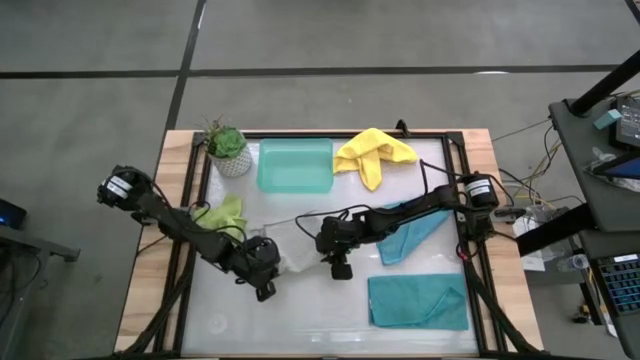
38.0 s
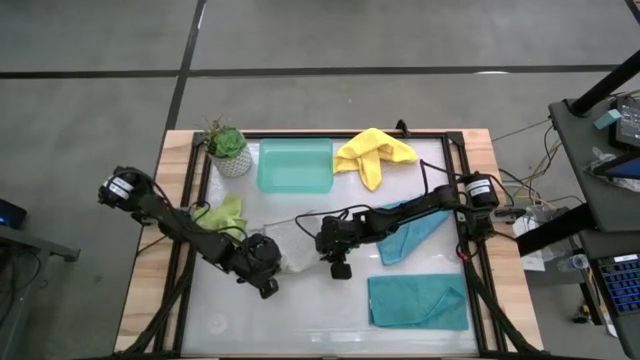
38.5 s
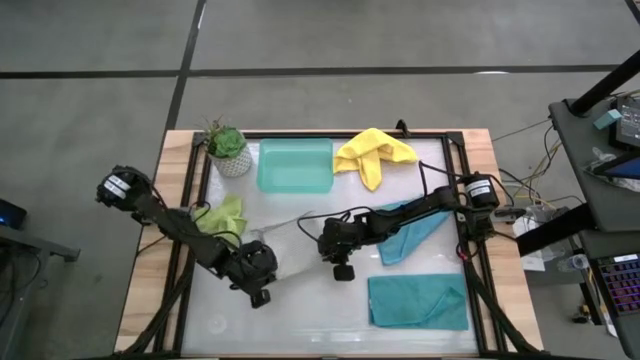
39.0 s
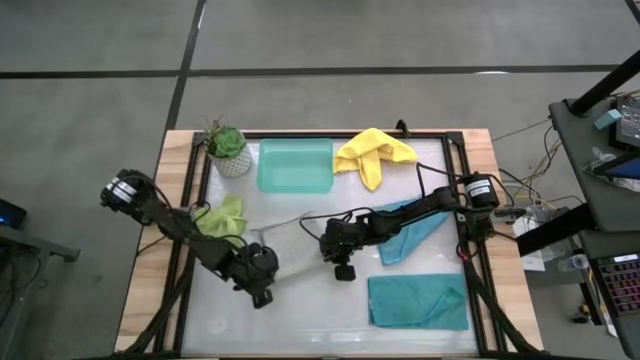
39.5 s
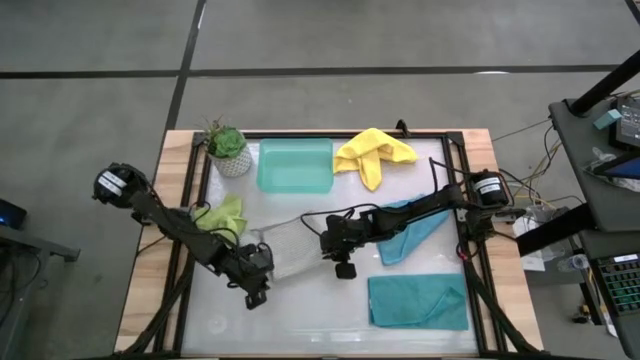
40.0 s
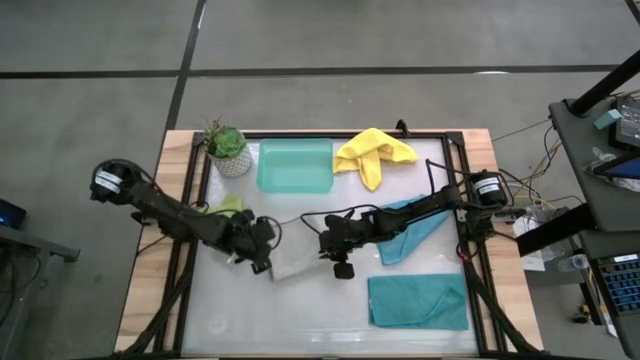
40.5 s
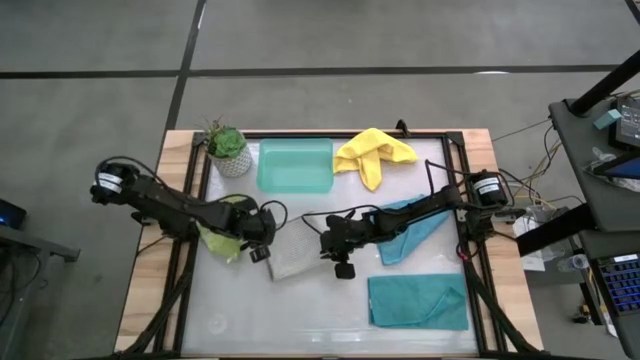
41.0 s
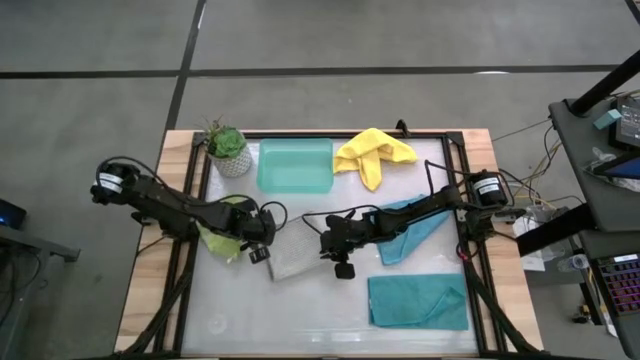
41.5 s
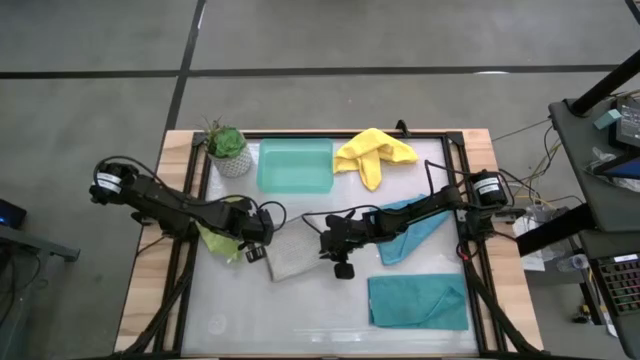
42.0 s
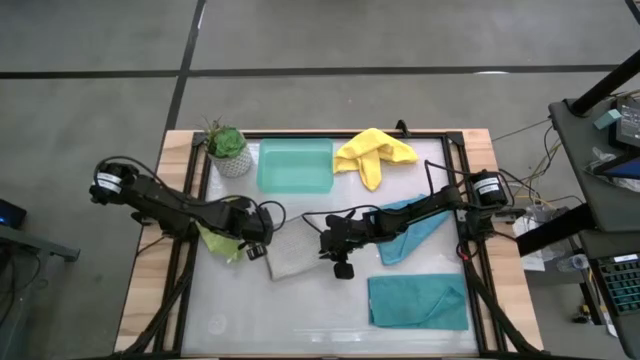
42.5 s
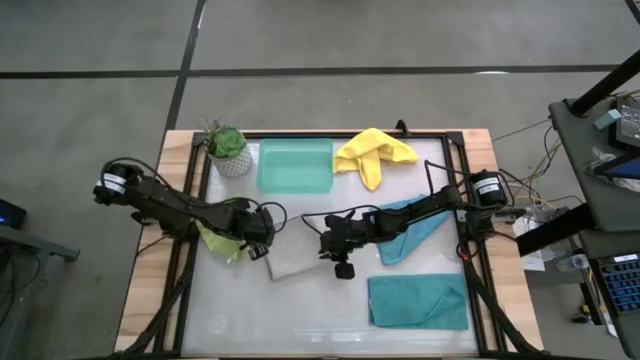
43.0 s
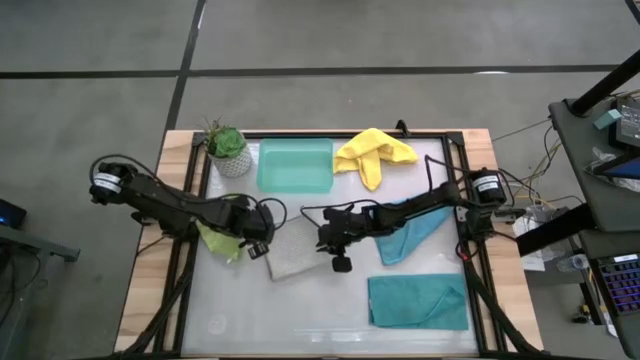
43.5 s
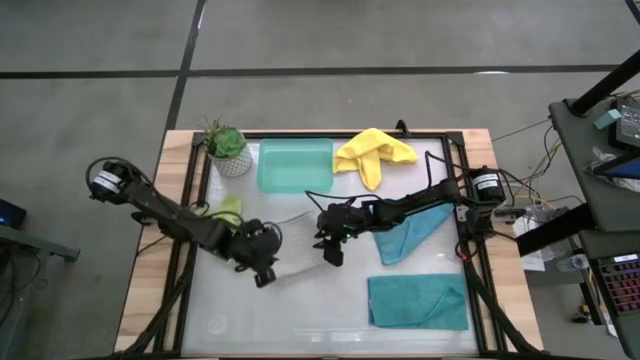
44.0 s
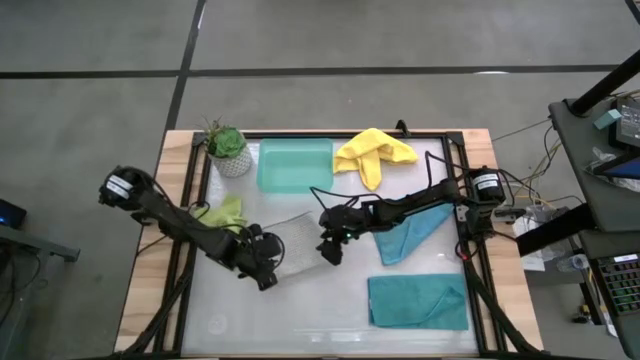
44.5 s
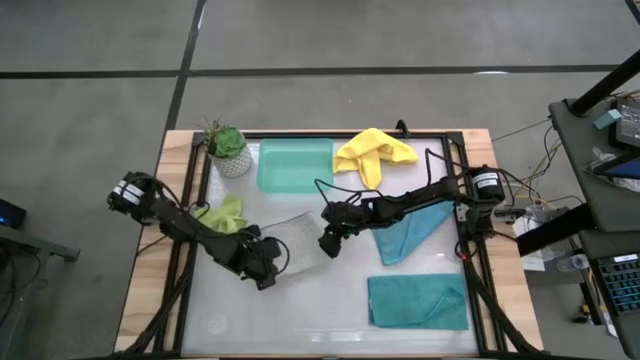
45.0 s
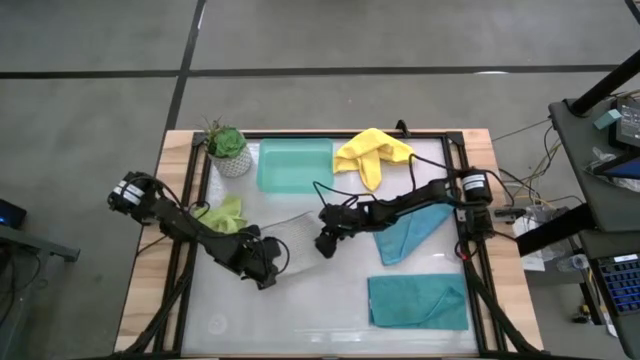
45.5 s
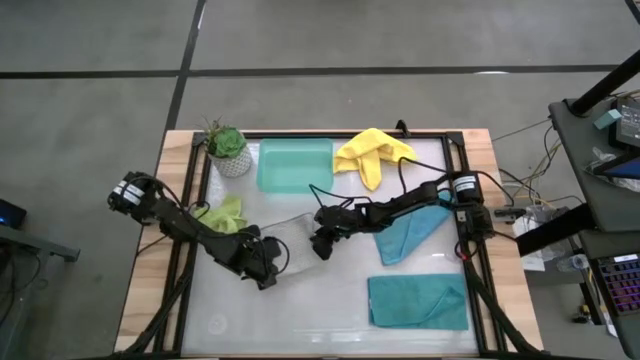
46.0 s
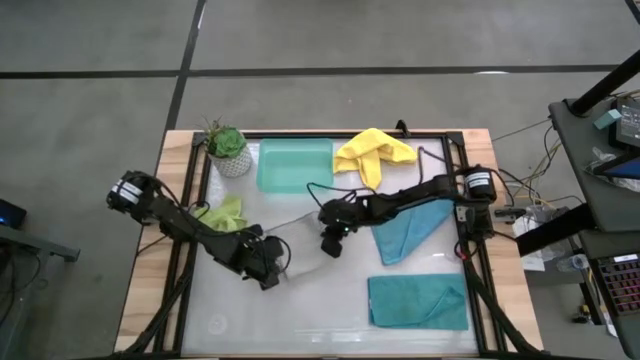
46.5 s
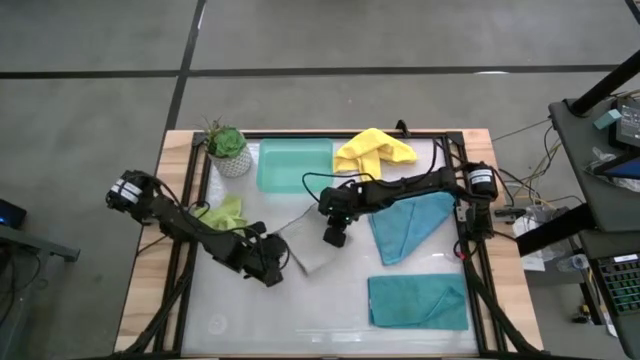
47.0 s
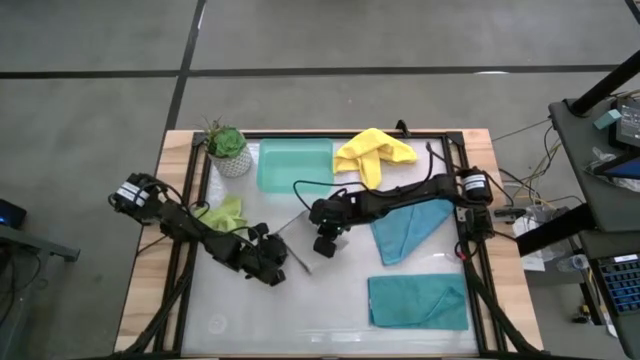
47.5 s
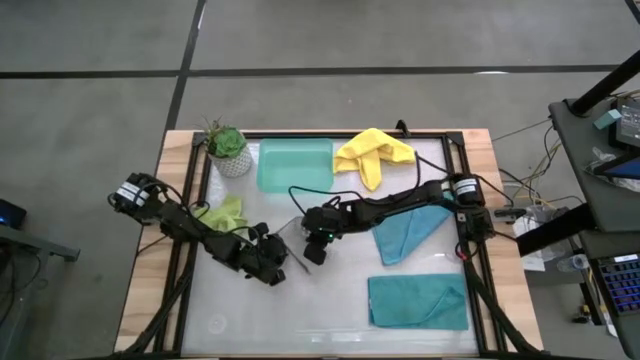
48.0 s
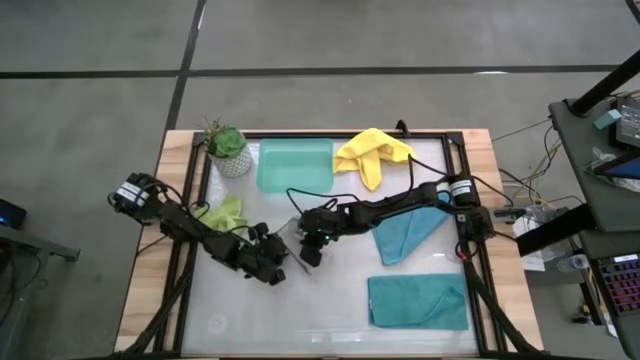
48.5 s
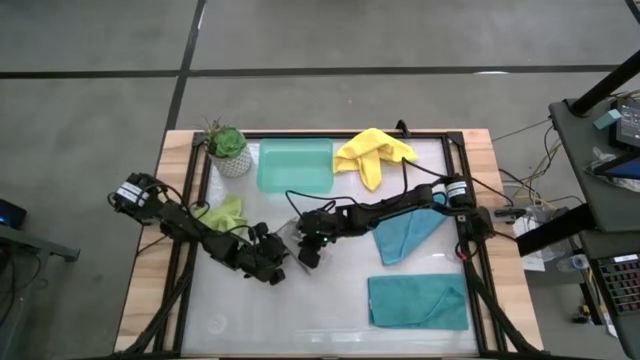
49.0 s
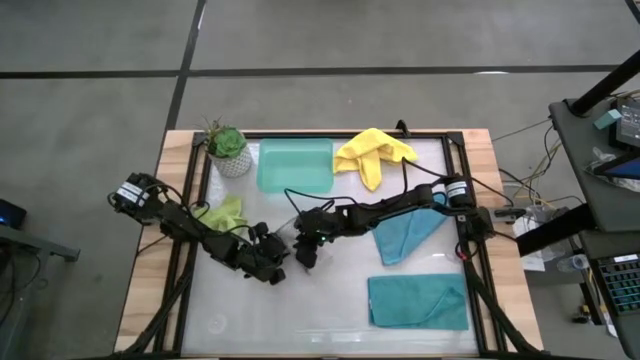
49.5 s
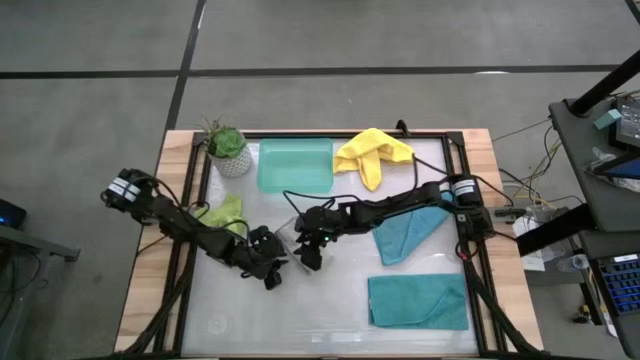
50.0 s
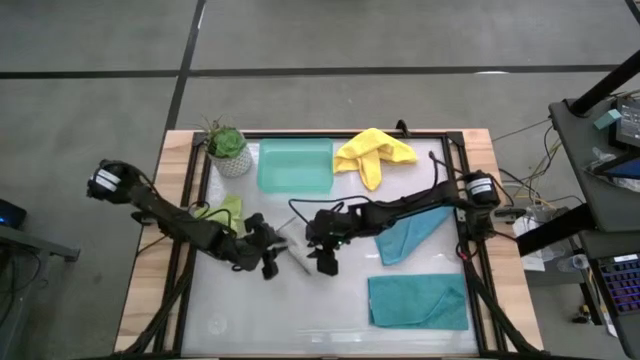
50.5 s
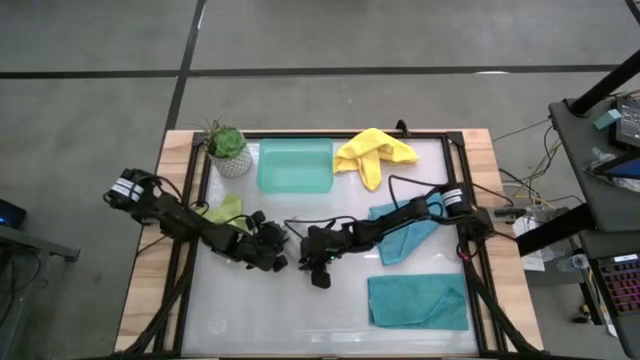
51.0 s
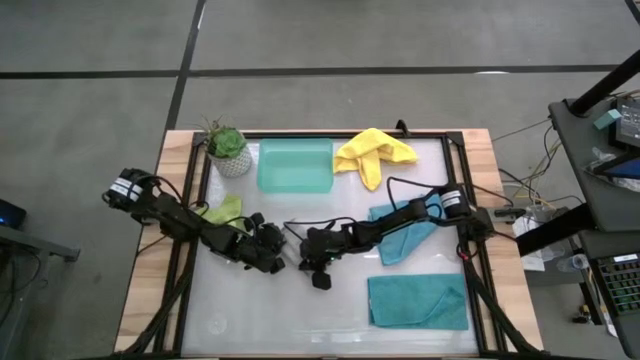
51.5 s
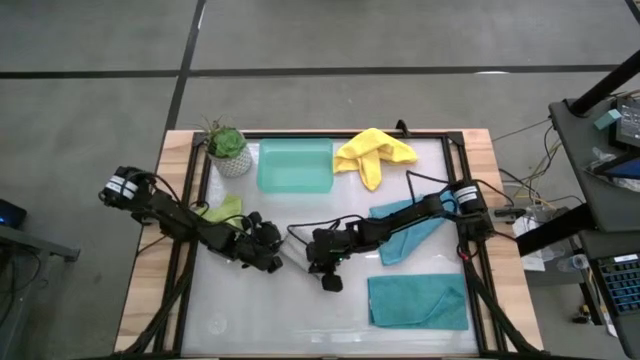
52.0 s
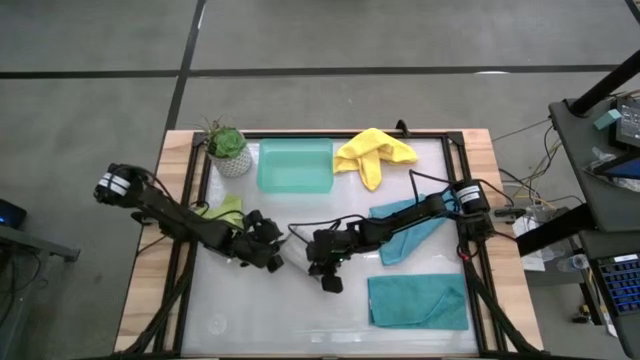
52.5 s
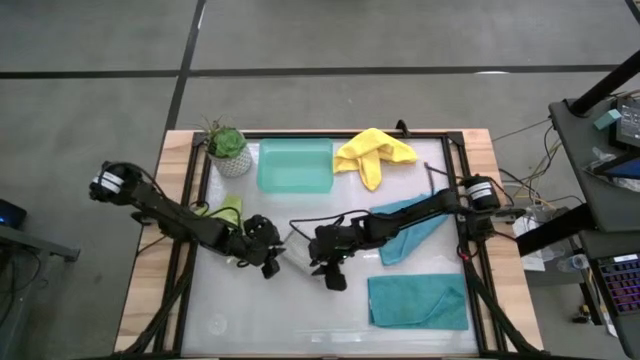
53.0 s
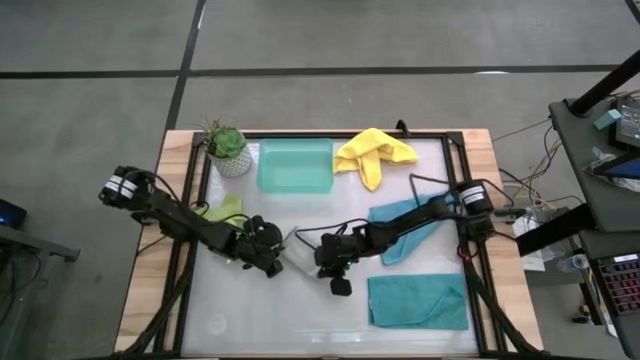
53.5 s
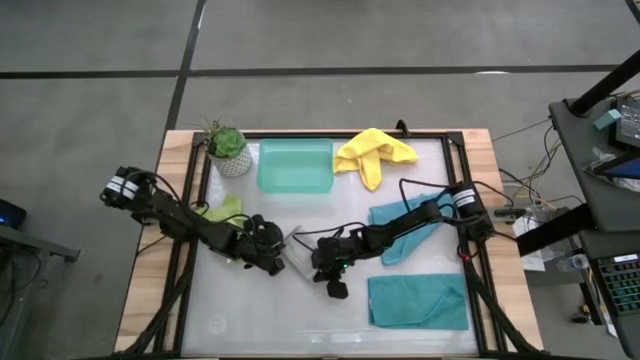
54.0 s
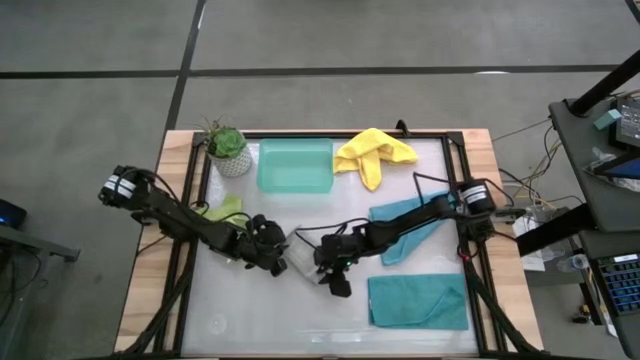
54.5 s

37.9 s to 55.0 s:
Task: Fold microfiber towels
Fold the gray microfiber towel

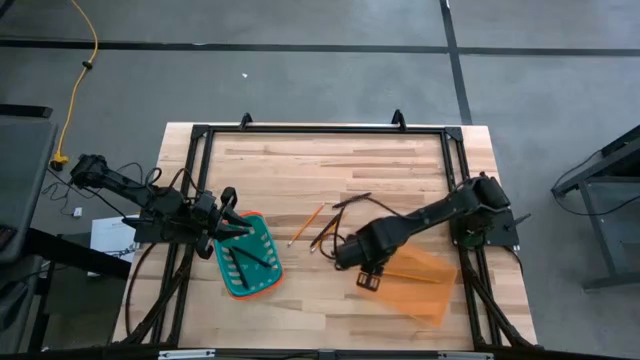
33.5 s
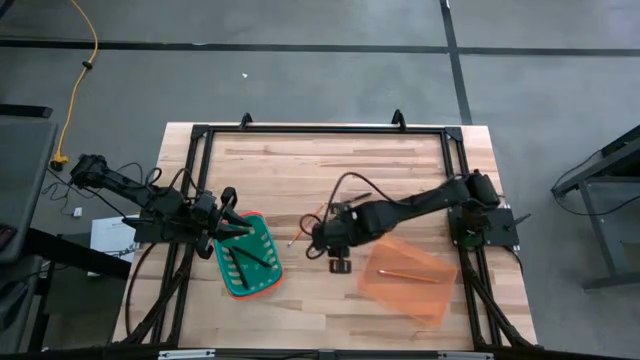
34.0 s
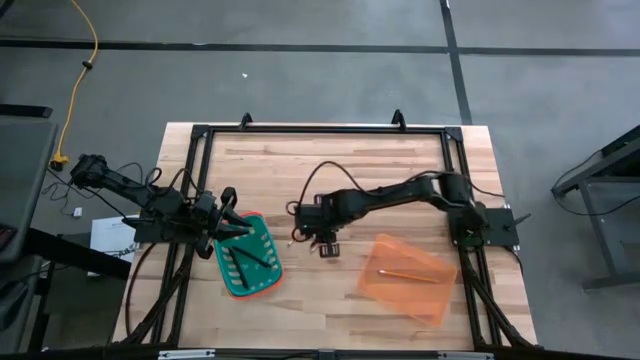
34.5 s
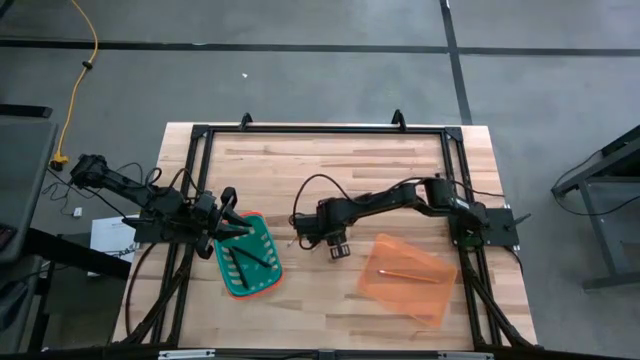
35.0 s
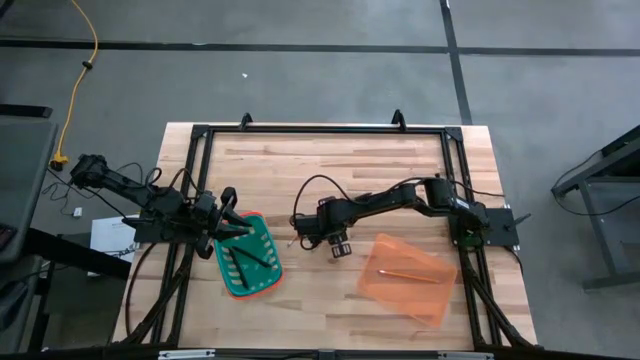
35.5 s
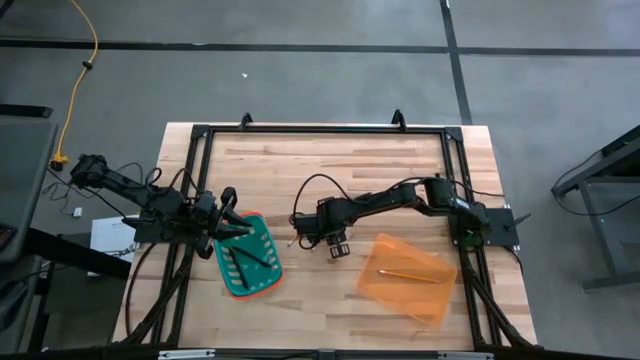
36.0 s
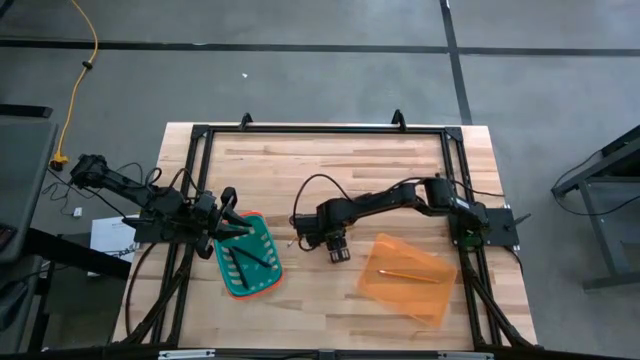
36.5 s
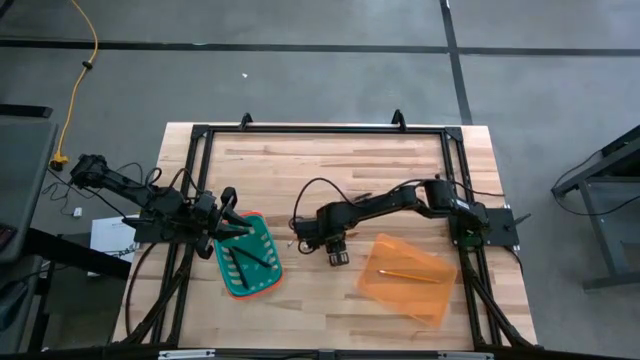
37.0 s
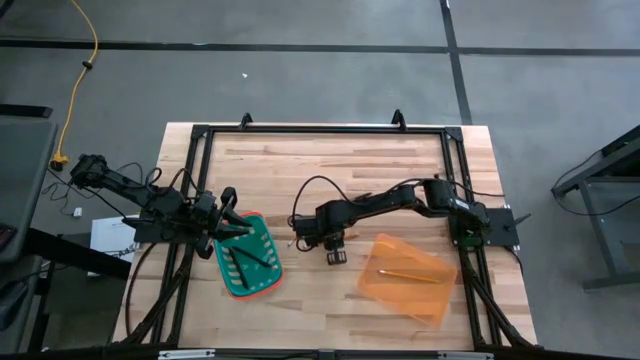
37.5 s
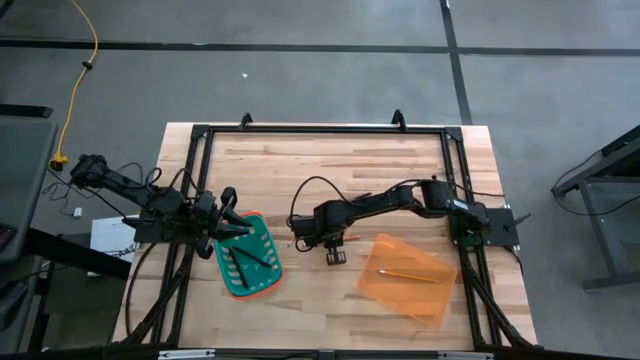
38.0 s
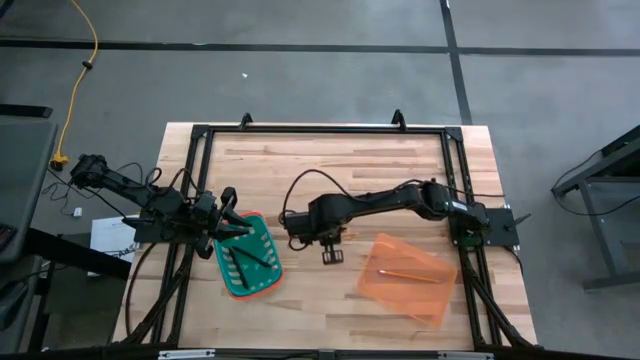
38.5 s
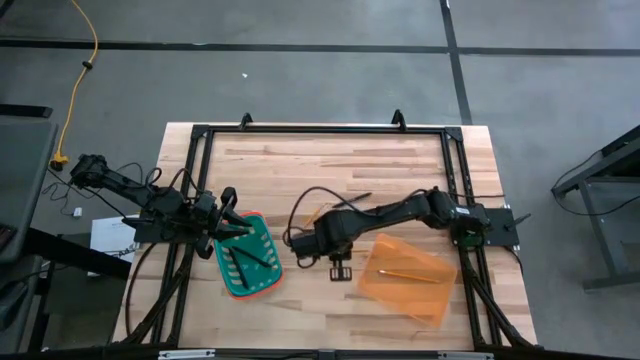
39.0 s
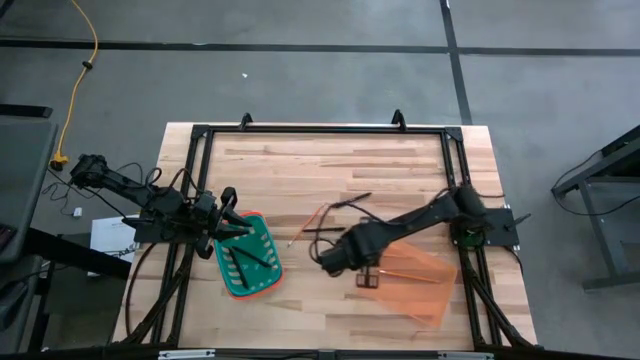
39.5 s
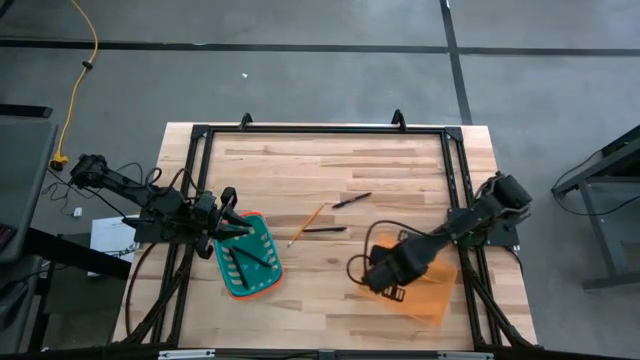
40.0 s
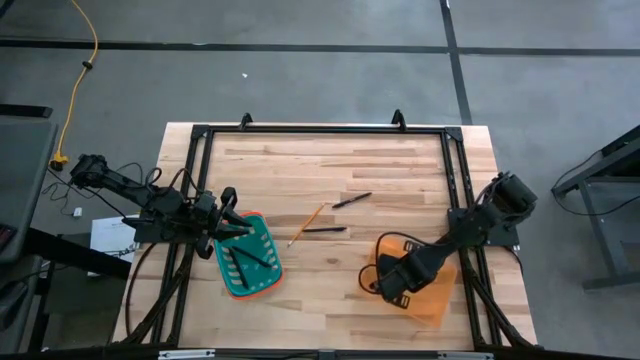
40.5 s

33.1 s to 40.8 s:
Task: Sort pens & pencils
Put the pencil into the orange bin
